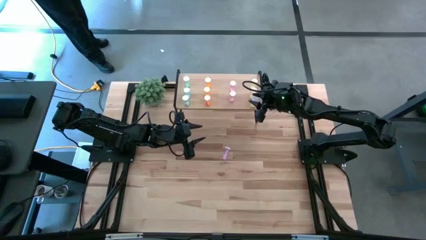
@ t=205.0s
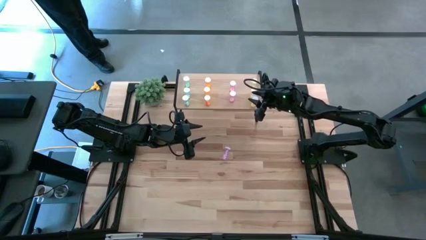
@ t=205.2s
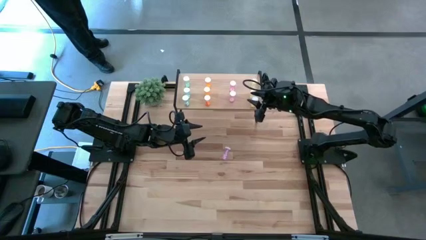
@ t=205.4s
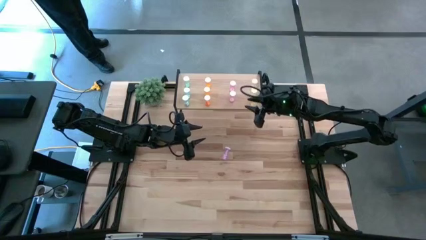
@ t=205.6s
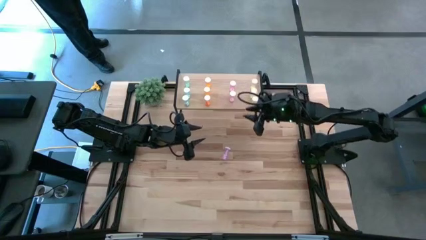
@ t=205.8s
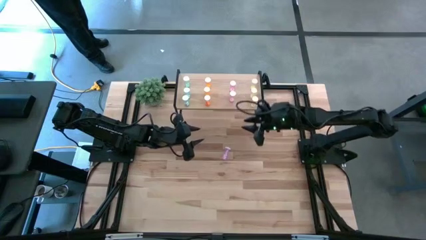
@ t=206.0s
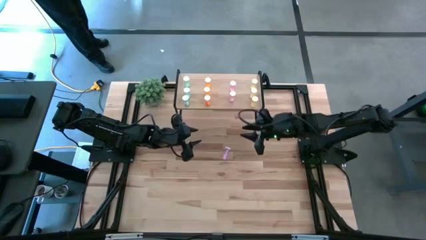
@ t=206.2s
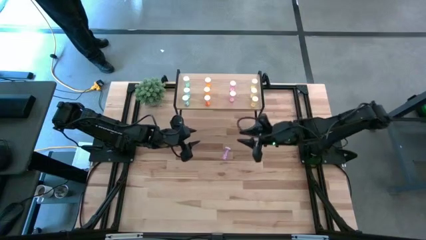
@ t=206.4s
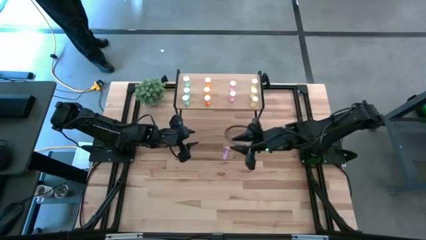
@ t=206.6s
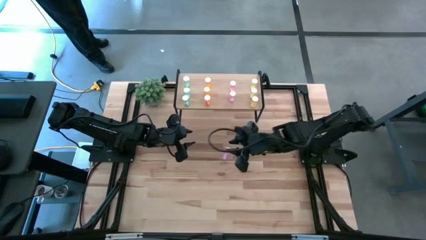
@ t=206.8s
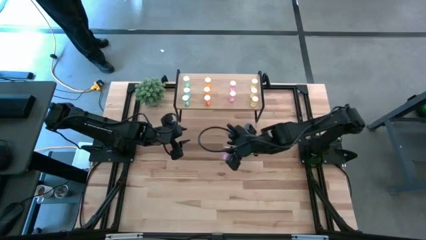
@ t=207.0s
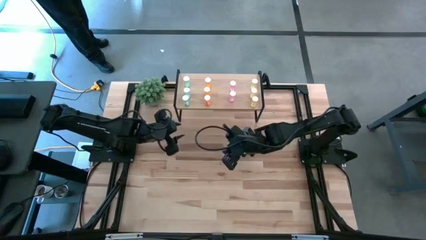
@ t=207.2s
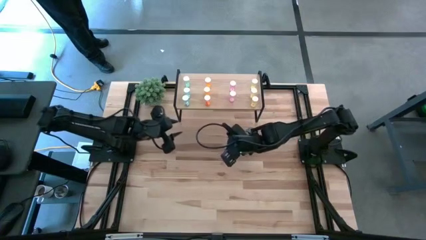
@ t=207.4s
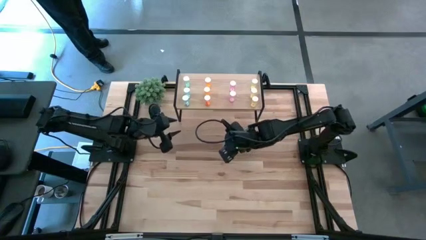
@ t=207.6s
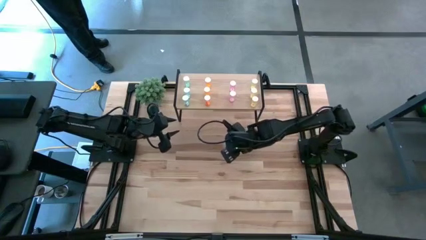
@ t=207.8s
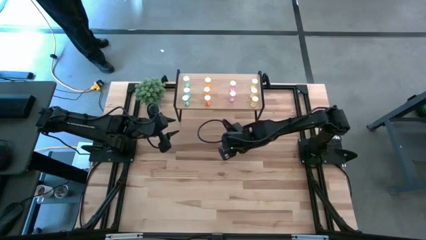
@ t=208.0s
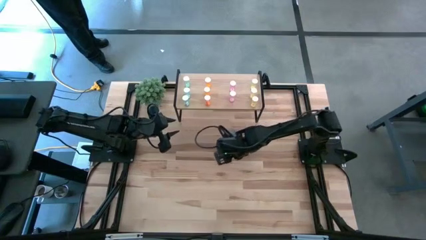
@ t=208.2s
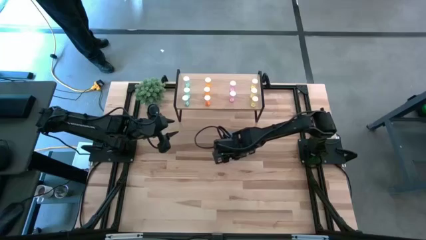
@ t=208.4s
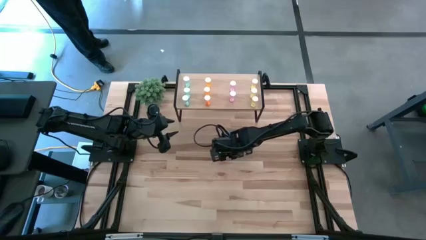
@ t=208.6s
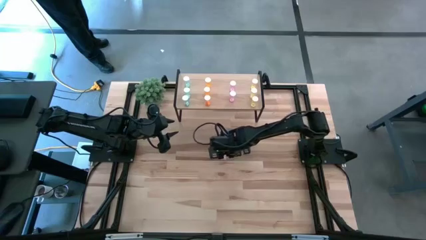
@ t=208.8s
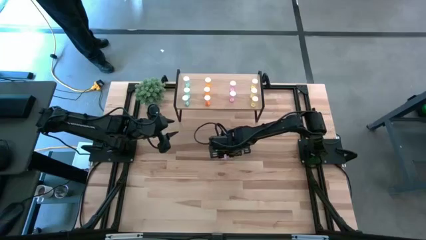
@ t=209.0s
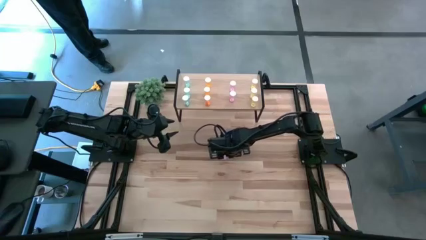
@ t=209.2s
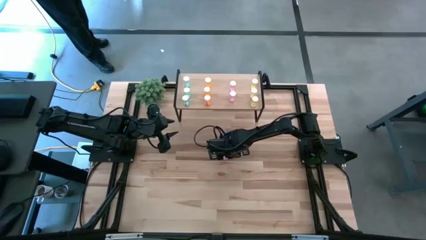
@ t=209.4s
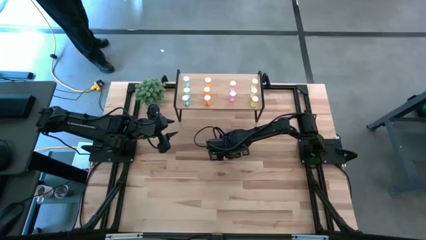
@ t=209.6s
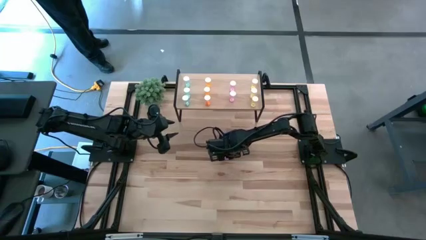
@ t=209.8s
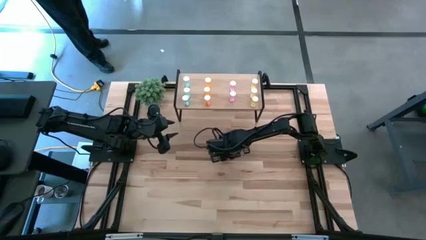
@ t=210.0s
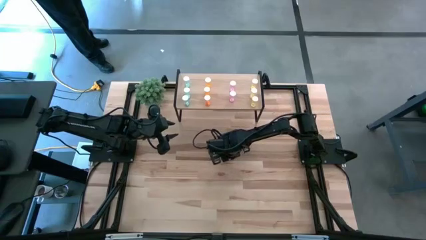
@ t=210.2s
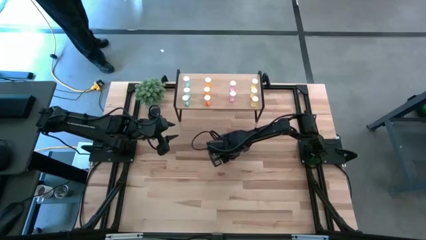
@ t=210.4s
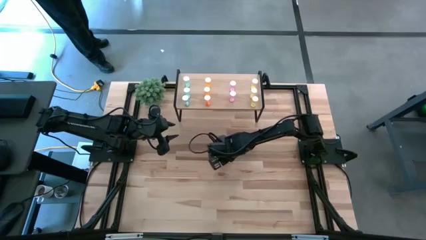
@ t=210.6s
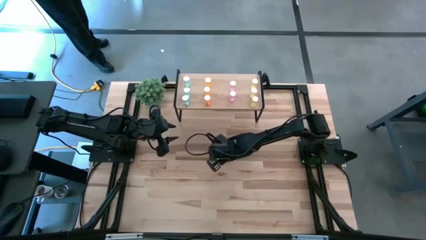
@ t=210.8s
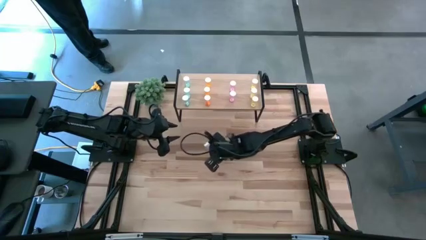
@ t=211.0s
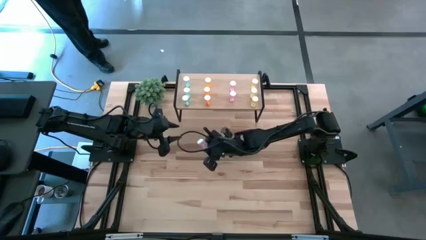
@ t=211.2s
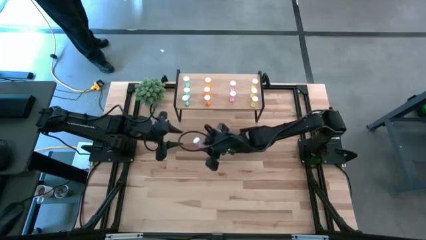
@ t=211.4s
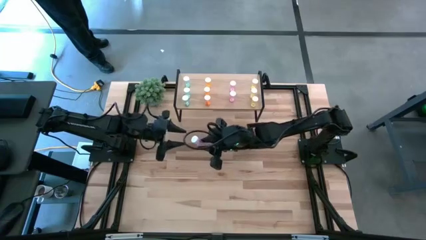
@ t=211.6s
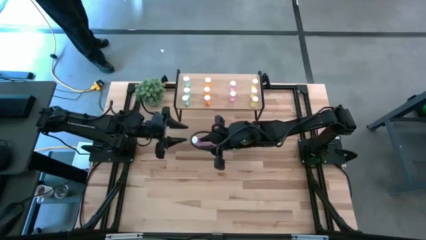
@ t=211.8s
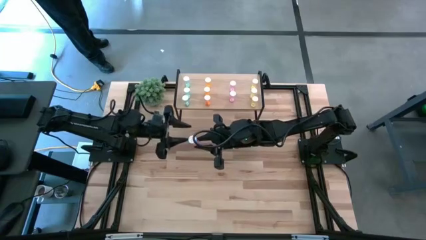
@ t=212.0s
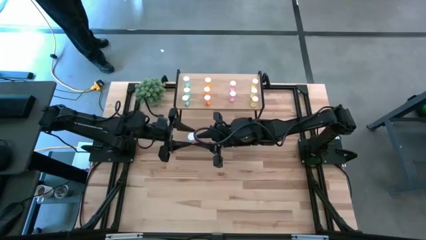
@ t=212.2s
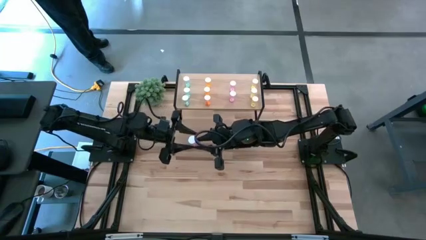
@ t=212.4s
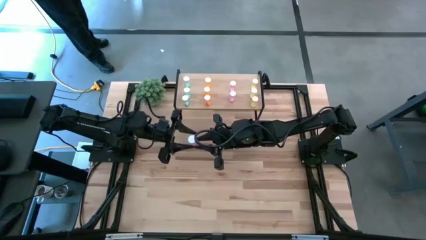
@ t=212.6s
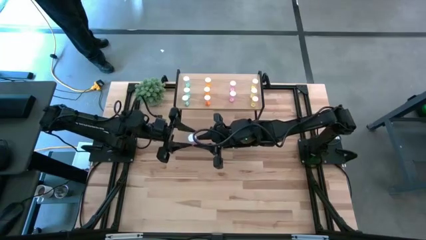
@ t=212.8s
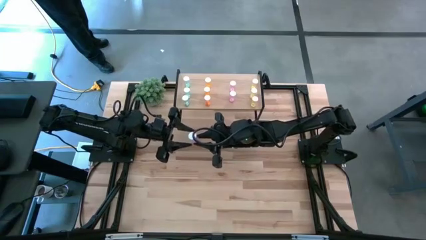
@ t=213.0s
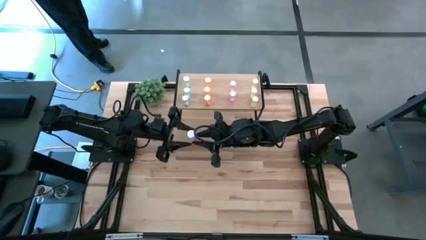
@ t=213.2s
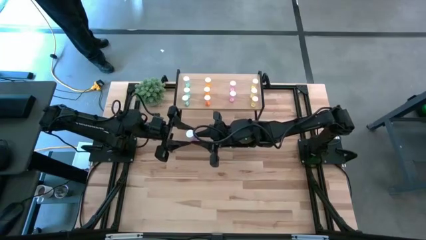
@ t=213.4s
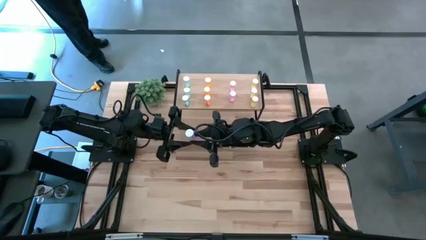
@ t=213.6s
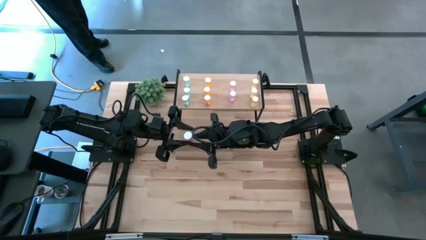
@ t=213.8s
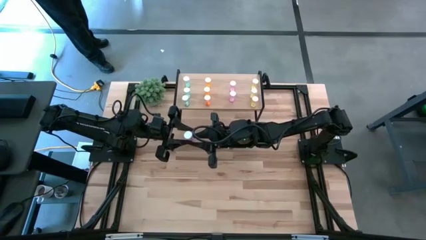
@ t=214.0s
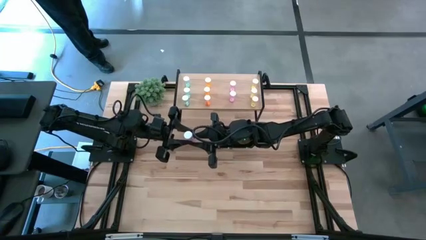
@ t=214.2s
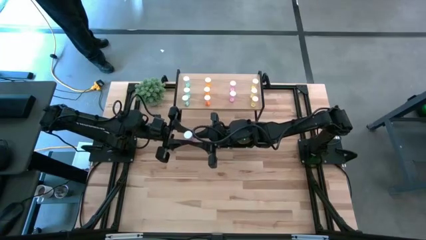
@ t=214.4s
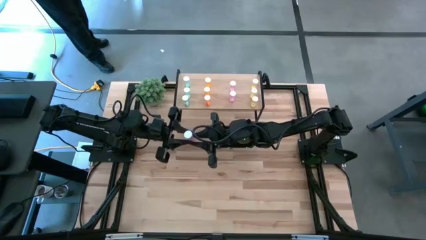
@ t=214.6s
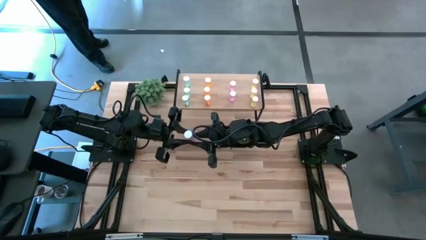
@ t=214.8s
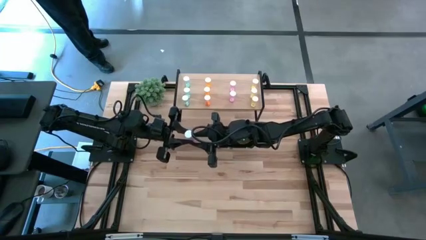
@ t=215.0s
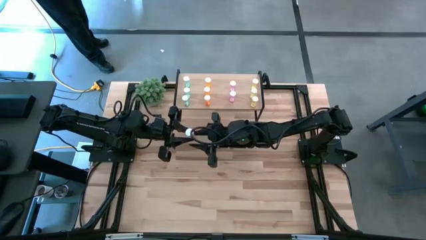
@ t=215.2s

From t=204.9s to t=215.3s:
Task: Pick and place medicine bottles onto shelf by color
Put the purple pill bottle on the shelf aligned with the purple pill bottle

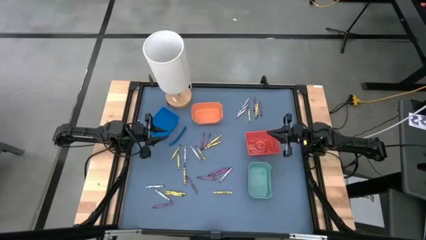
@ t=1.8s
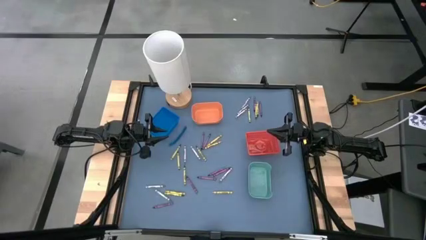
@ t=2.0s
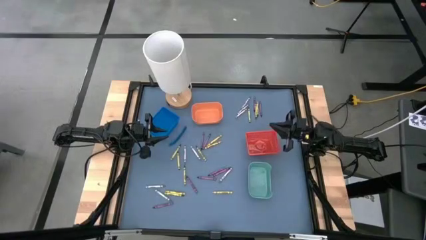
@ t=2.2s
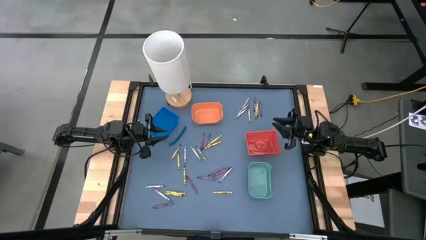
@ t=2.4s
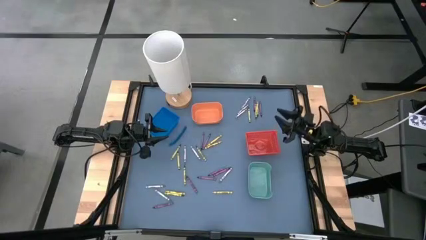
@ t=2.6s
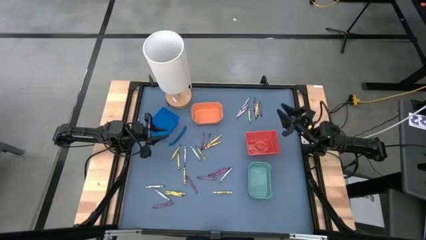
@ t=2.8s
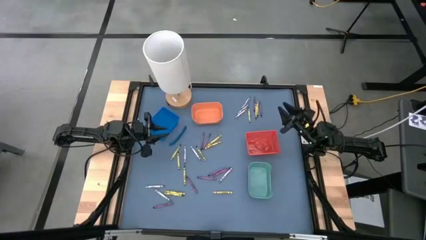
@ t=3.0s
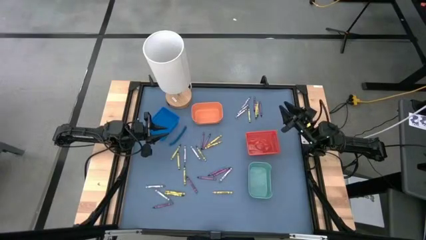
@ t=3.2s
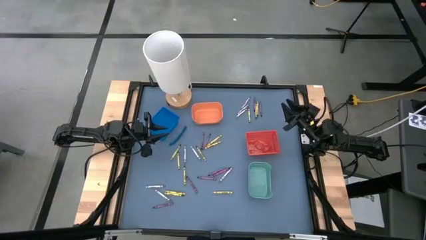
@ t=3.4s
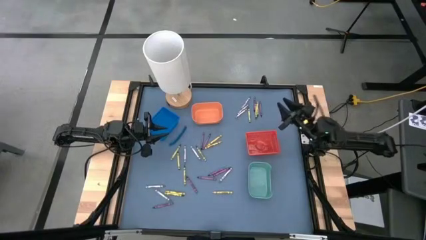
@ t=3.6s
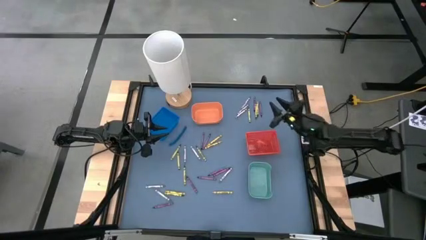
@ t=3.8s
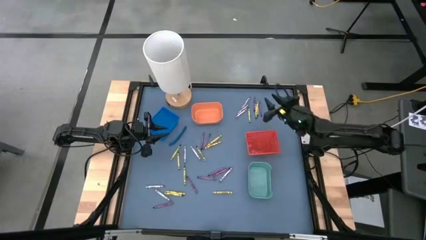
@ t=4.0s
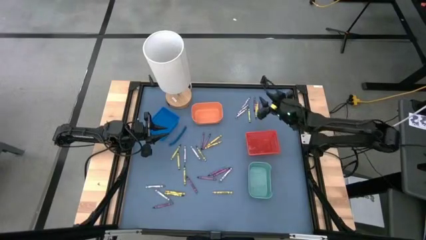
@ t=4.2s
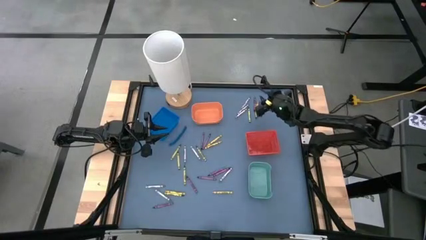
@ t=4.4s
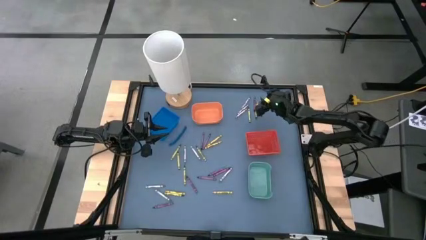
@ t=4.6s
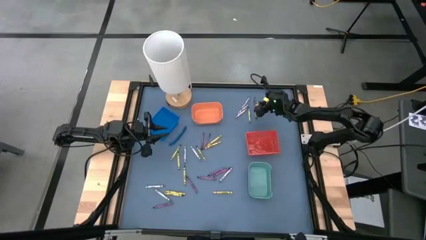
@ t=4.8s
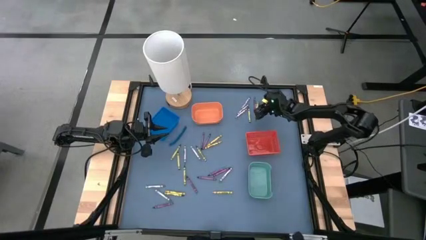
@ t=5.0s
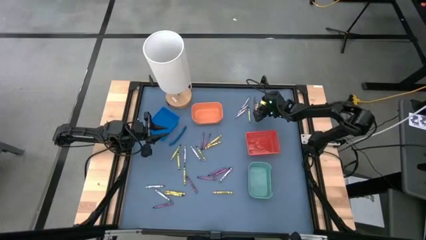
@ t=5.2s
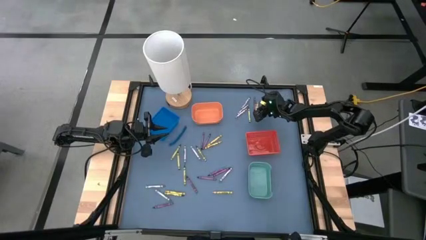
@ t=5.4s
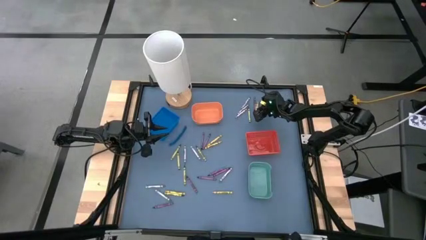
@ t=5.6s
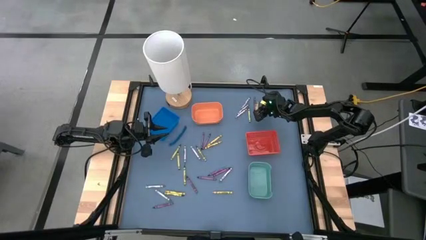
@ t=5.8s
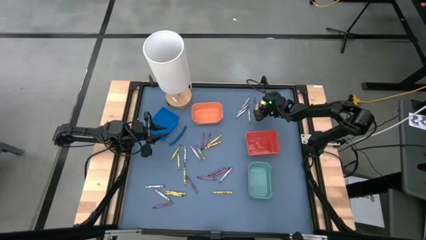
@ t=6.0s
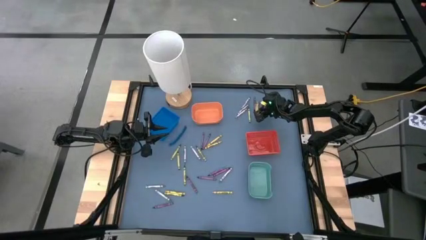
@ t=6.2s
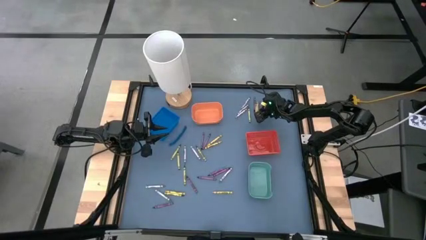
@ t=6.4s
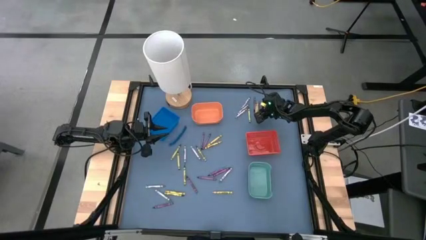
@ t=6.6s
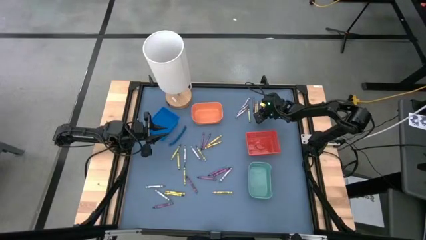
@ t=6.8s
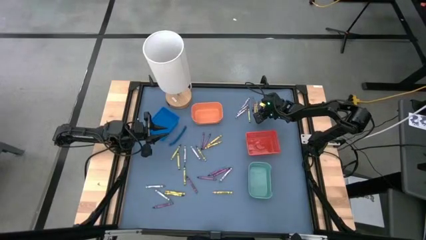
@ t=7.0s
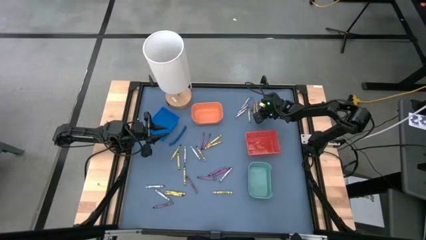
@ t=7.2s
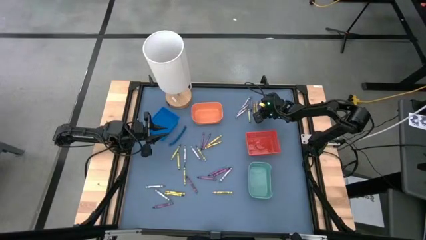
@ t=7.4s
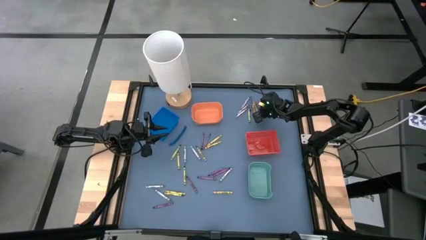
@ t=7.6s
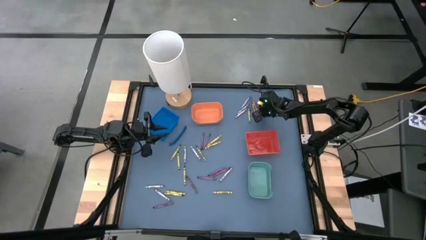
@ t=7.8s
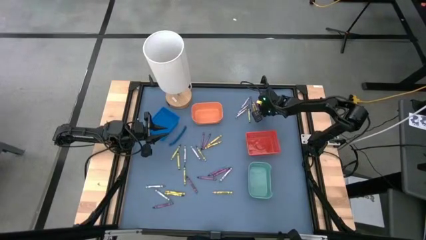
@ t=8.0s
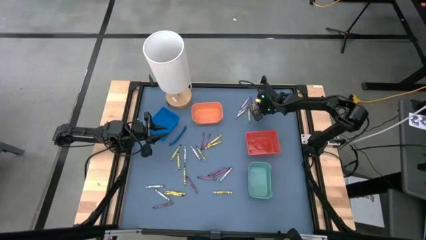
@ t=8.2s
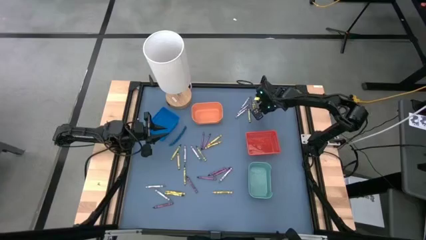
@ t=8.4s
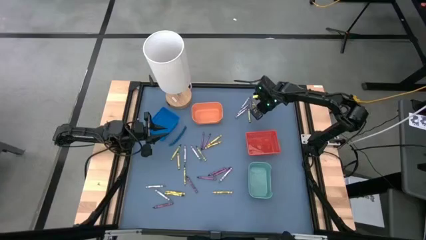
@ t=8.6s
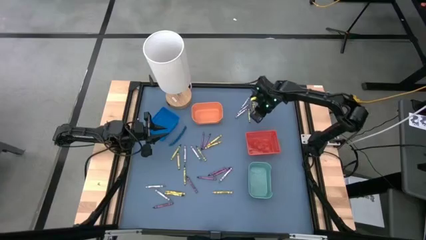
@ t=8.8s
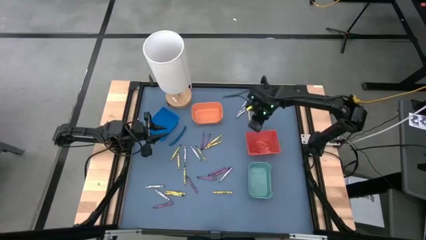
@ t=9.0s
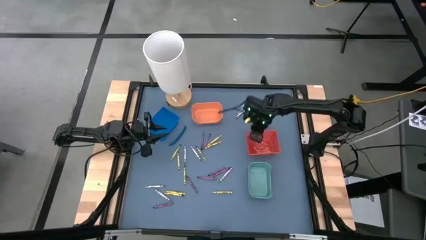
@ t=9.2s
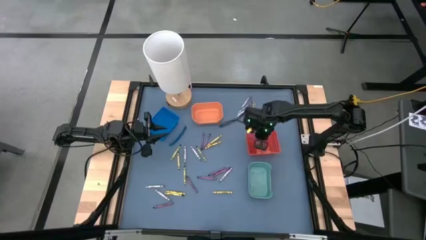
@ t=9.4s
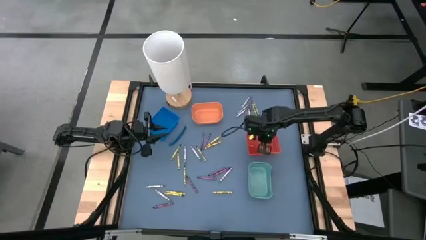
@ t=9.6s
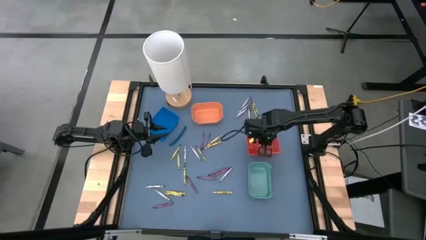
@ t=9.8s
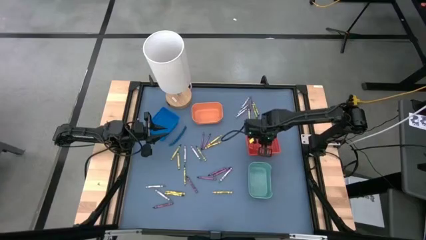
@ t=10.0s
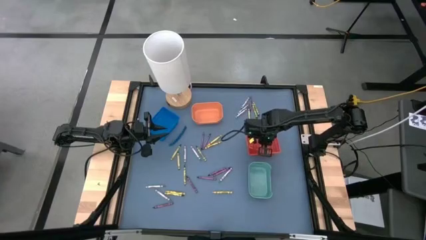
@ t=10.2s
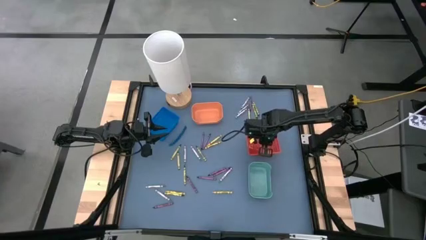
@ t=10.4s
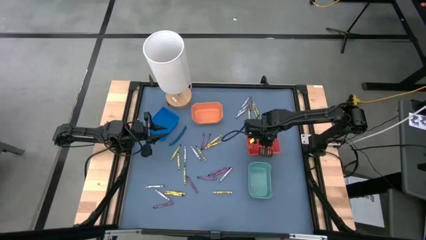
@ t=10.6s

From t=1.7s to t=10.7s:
Task: Sort crayons
Put the violet crayon into the red bin
